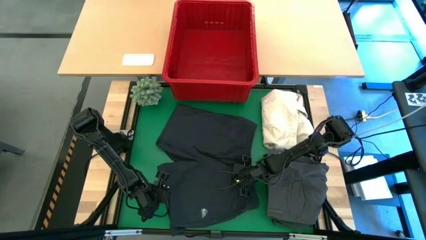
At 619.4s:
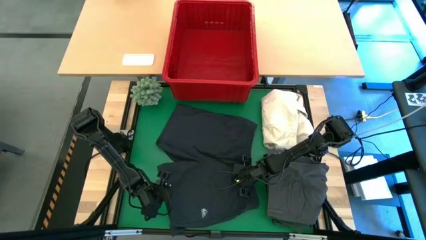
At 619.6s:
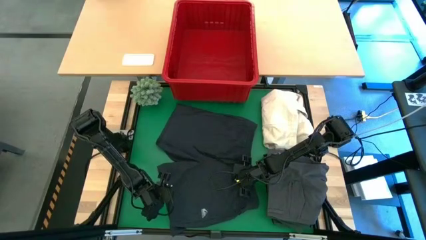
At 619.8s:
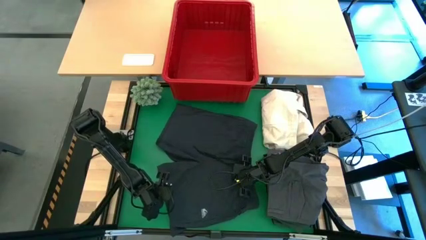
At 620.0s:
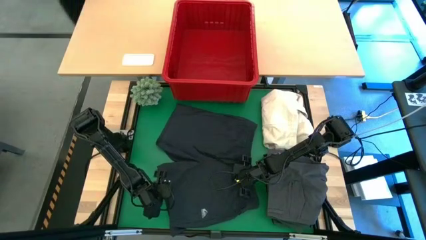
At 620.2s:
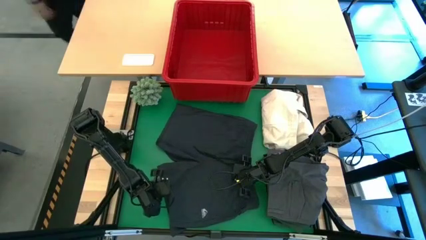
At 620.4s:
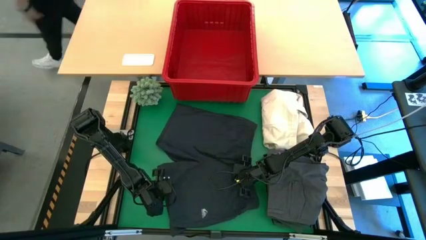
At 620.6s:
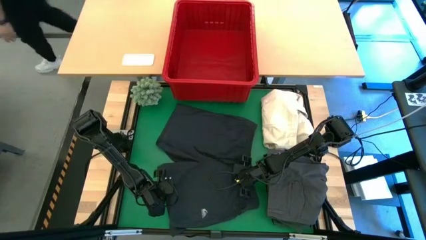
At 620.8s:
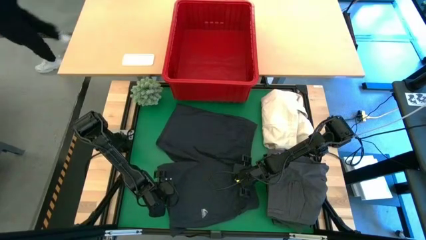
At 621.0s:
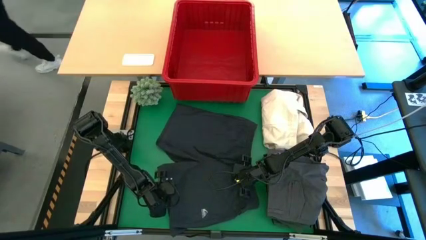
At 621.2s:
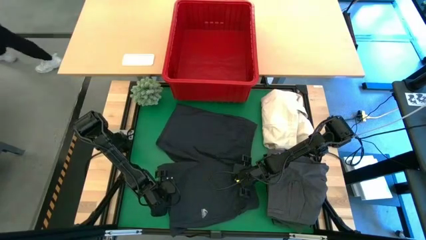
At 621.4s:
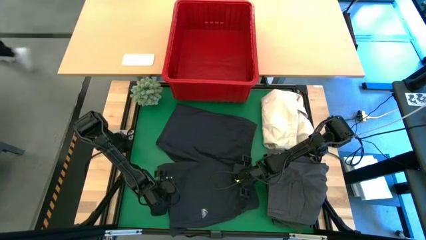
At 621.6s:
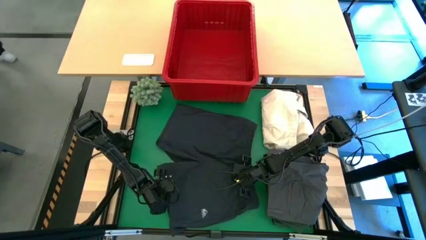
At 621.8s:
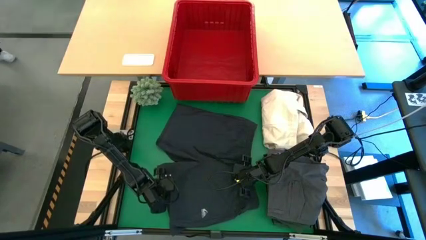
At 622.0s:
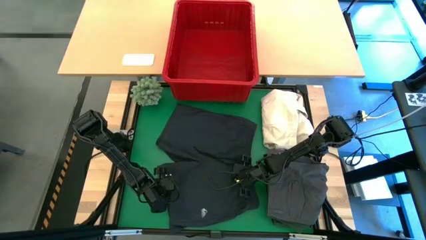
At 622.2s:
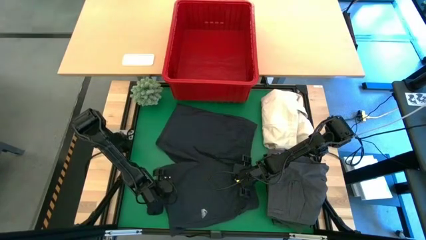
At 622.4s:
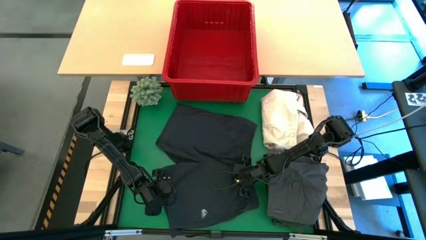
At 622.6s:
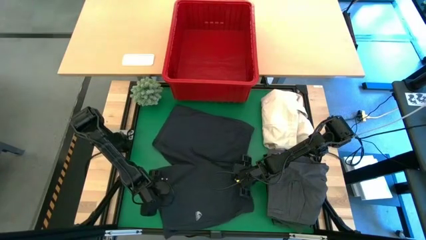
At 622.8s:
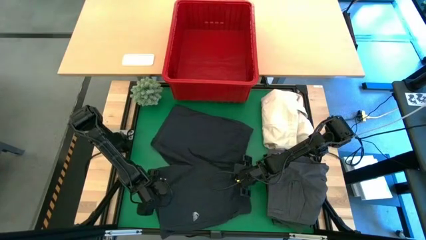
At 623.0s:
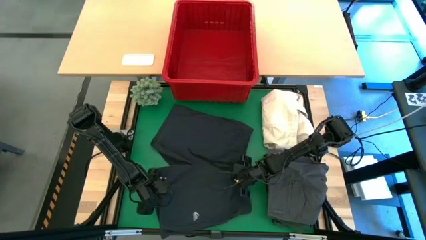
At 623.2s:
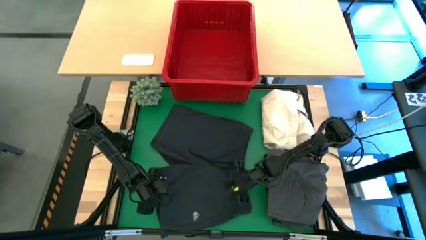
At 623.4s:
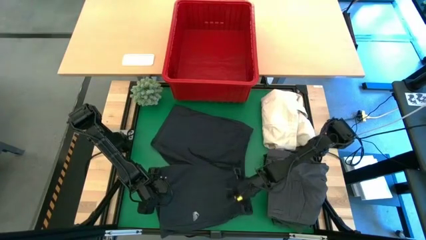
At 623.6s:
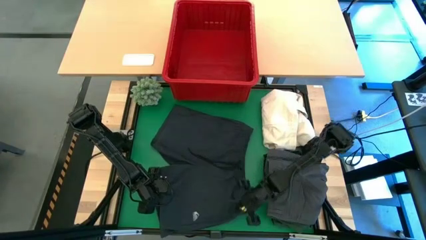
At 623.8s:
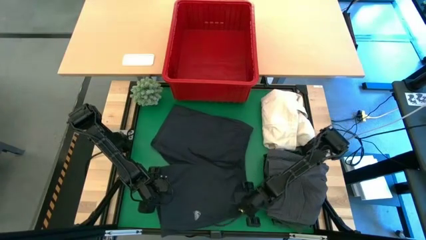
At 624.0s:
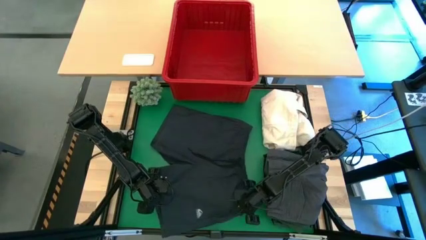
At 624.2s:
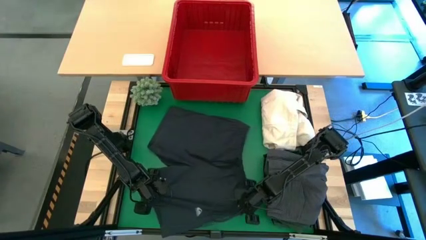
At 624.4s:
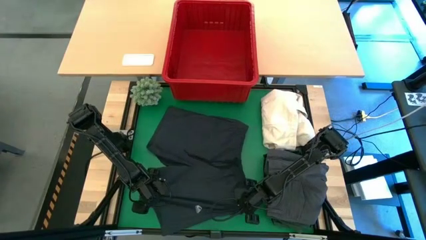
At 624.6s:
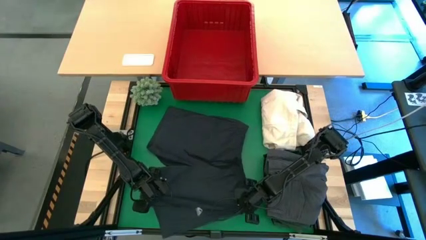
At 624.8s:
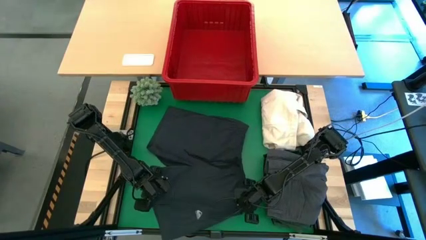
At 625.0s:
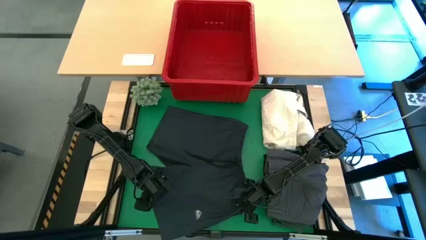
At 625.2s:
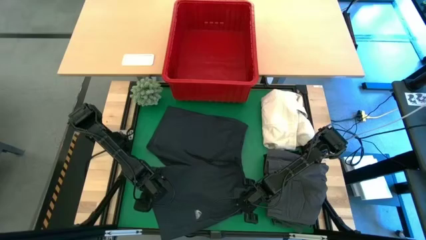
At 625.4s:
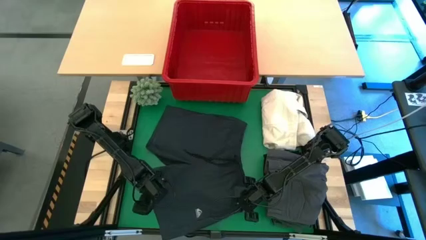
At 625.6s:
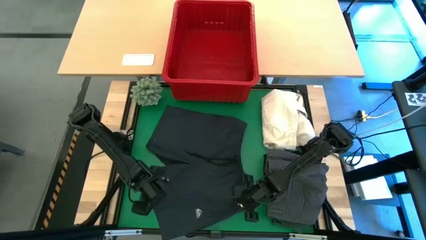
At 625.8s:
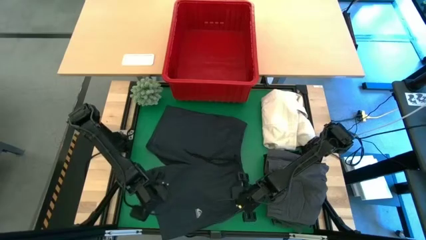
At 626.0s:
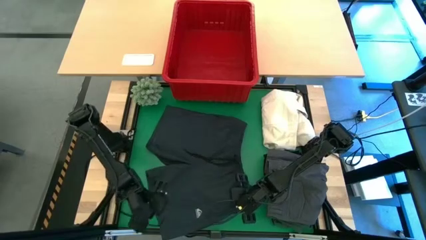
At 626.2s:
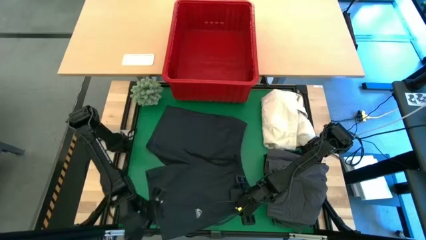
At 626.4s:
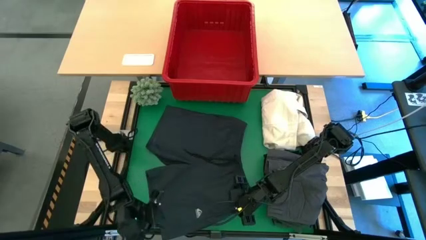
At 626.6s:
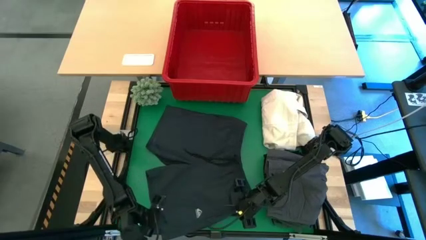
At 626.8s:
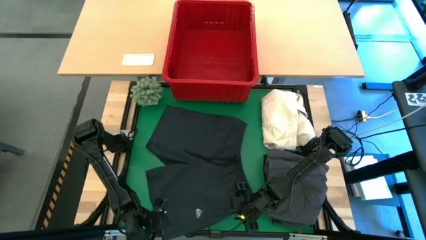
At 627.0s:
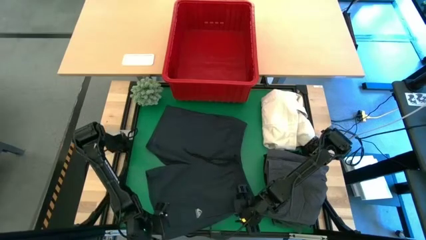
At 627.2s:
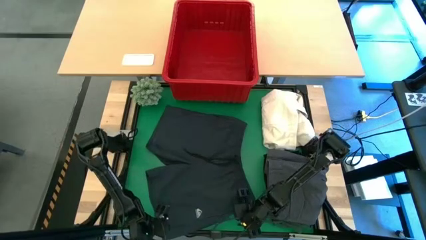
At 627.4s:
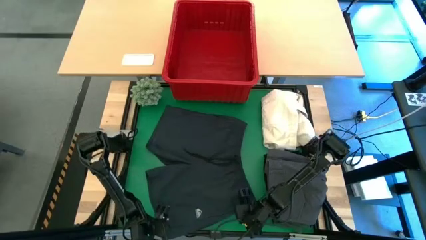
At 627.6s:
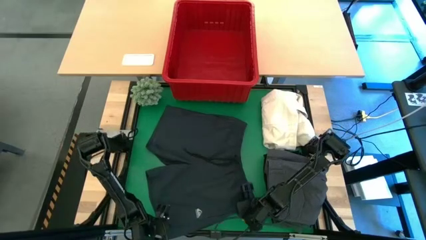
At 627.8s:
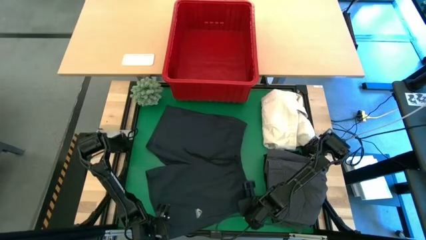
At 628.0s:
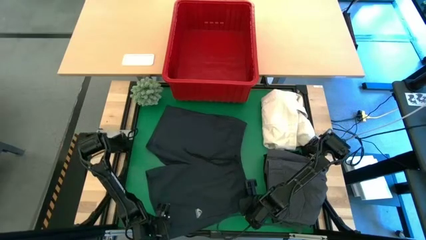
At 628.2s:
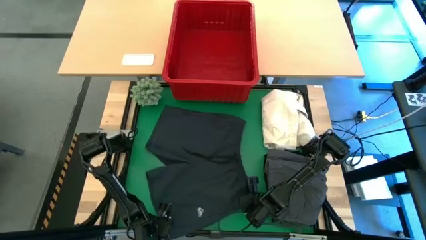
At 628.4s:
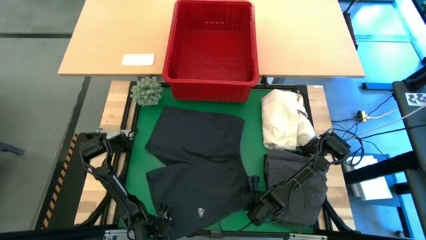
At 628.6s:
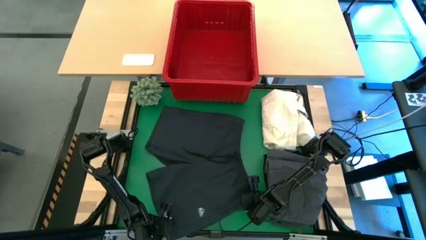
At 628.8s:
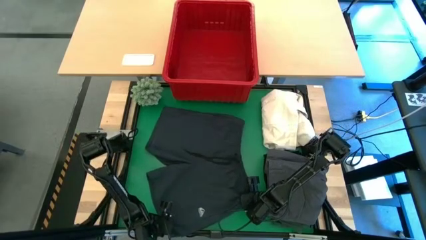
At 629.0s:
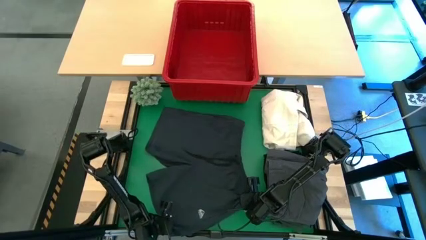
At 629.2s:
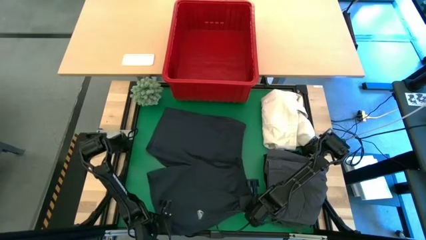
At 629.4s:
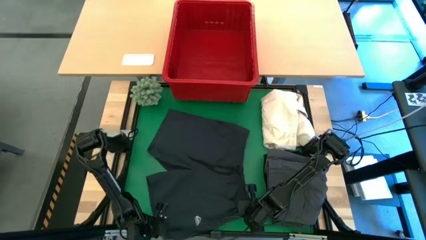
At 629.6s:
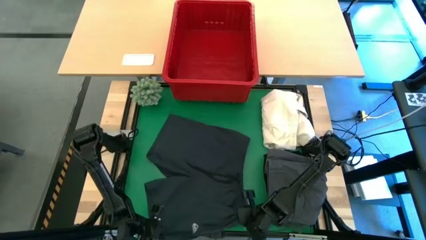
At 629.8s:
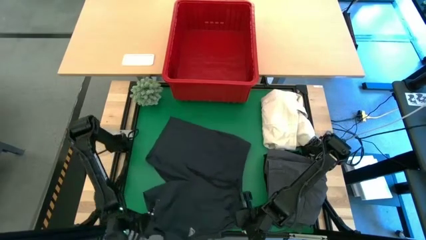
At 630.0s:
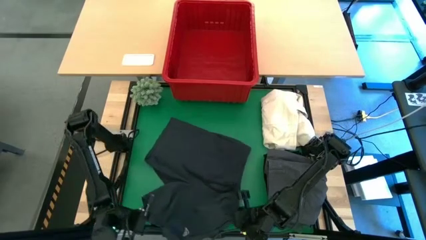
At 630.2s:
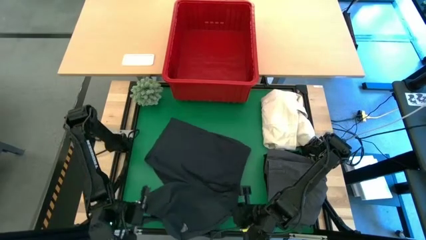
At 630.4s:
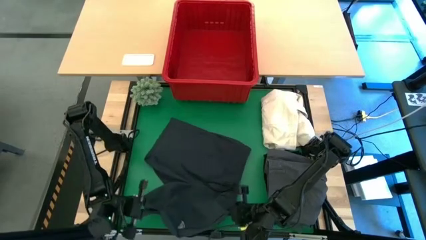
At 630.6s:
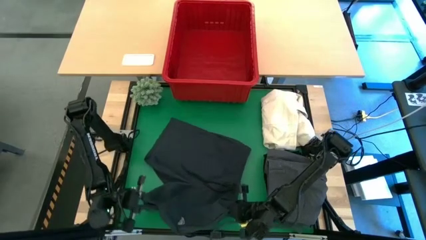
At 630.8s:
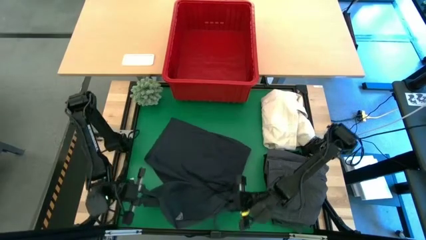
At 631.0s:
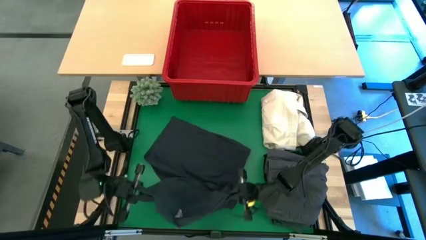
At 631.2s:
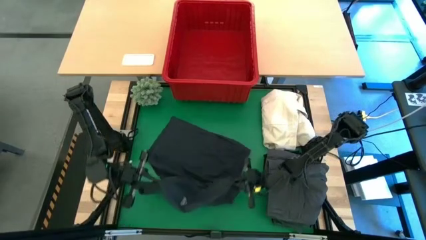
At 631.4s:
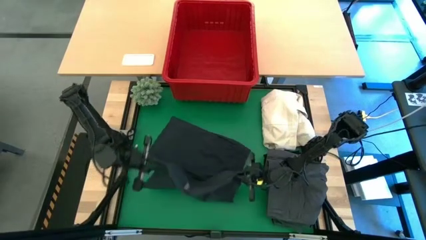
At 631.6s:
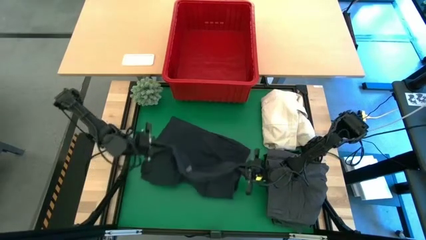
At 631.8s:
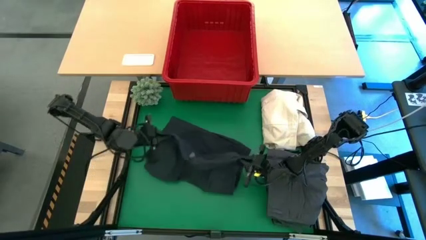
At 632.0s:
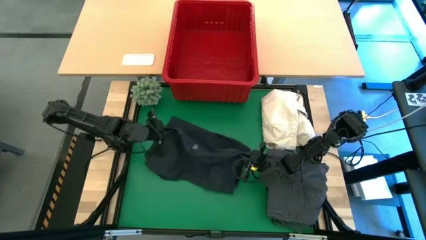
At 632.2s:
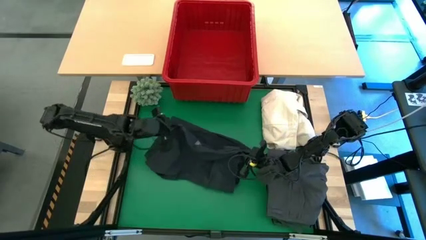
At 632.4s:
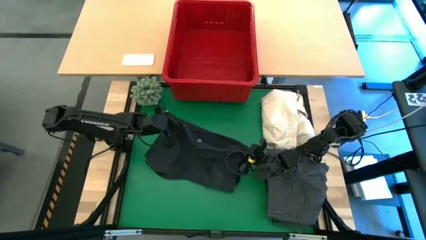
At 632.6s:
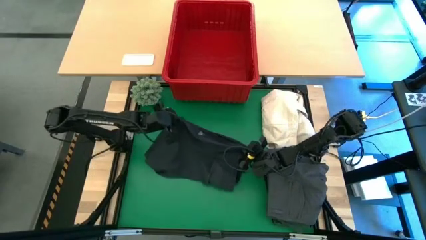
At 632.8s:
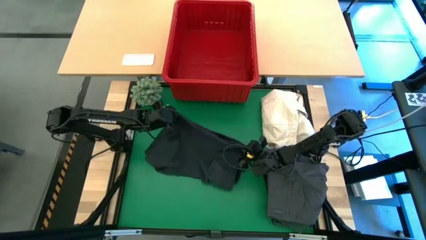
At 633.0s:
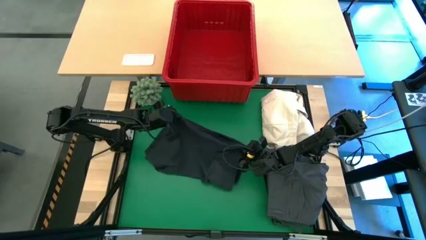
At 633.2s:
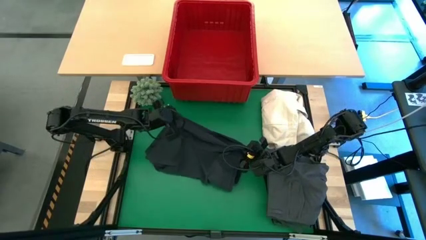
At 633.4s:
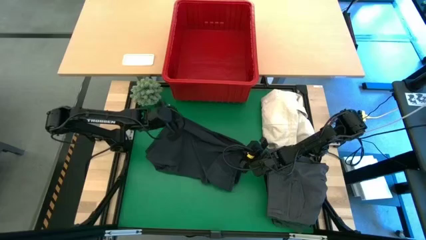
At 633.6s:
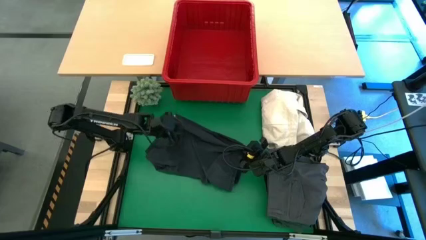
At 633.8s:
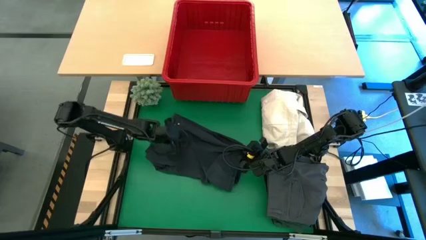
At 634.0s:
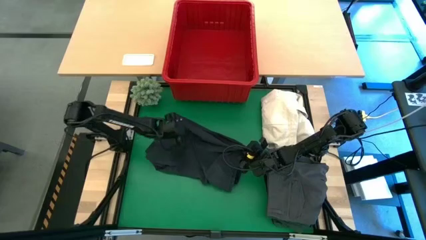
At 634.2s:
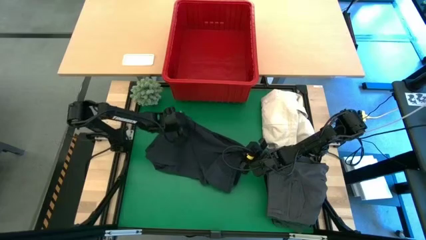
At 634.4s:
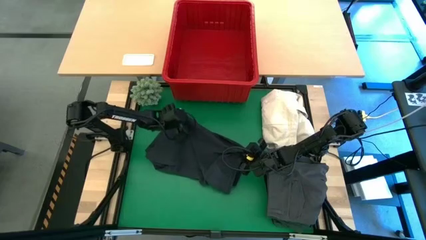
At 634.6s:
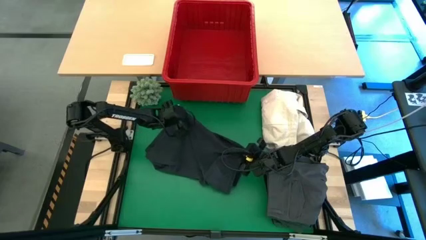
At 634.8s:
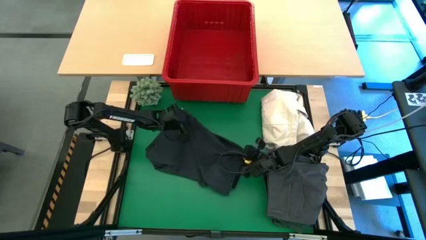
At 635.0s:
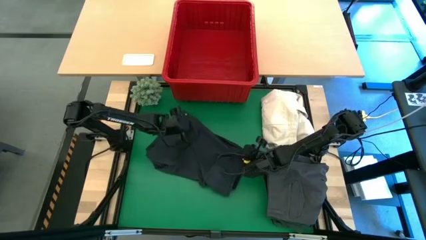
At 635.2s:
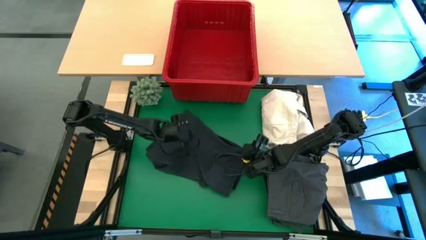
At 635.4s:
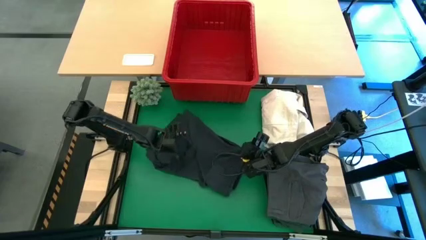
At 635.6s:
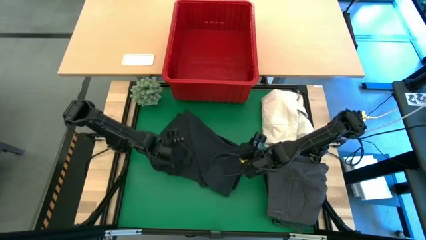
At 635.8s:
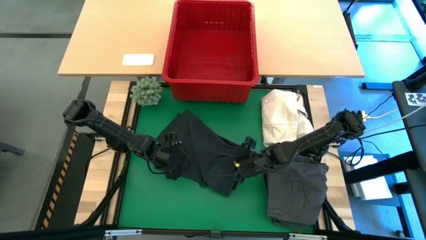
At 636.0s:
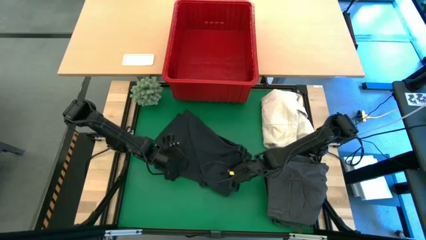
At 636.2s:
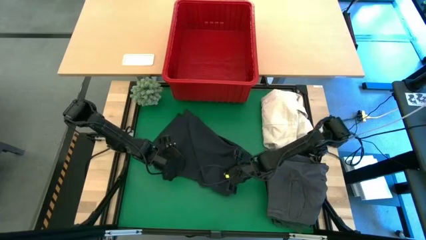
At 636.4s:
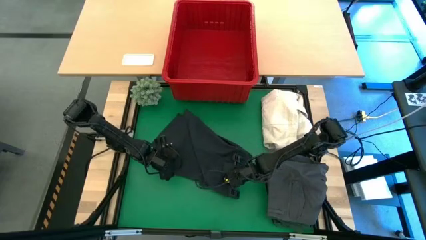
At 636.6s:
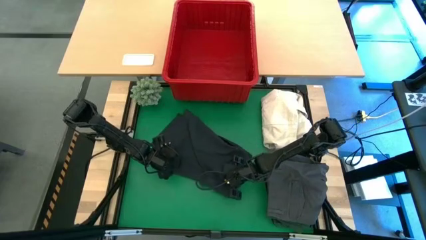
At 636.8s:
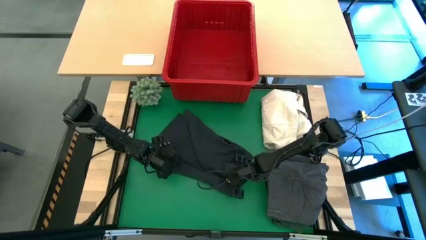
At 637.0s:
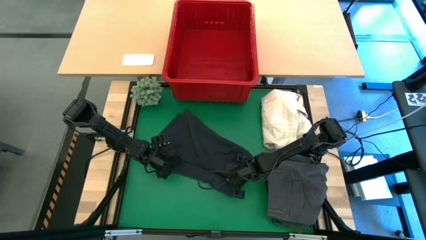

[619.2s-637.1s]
Task: Fold laundry
Fold the gray short
